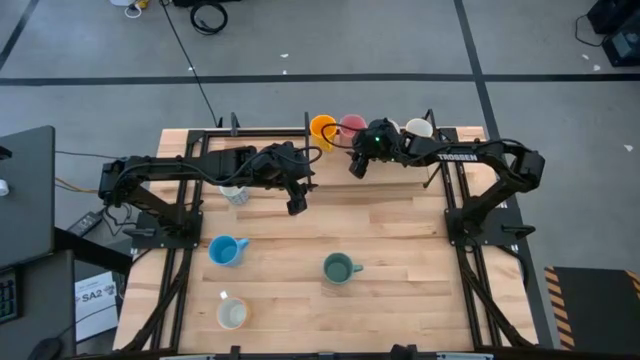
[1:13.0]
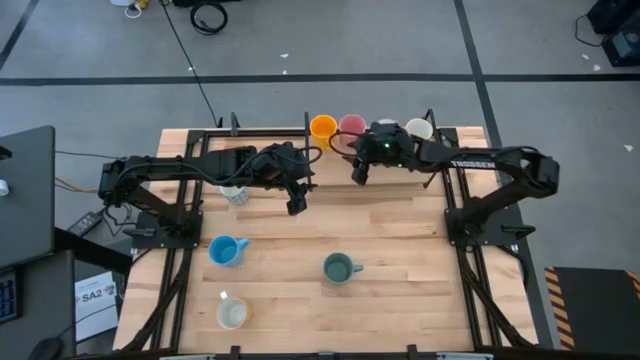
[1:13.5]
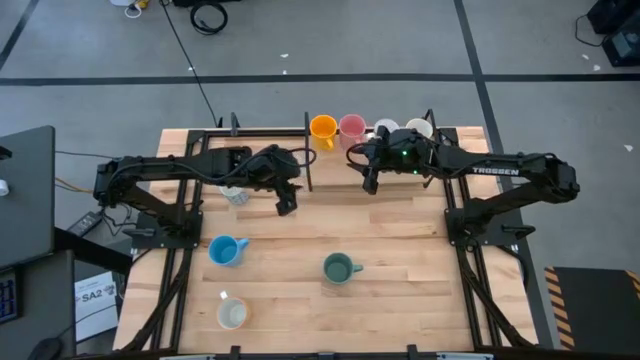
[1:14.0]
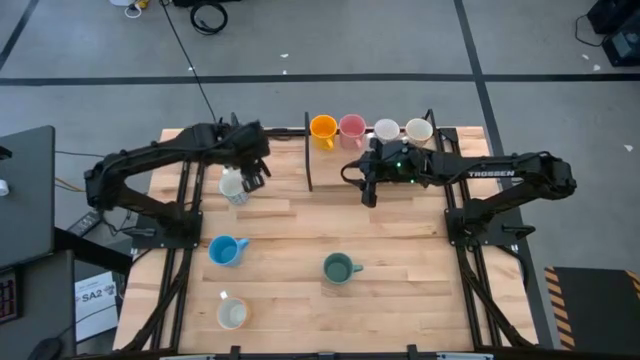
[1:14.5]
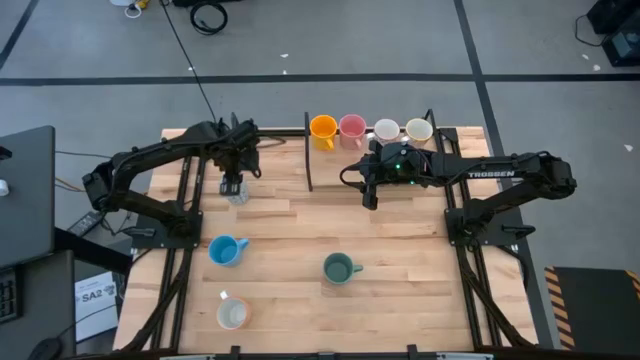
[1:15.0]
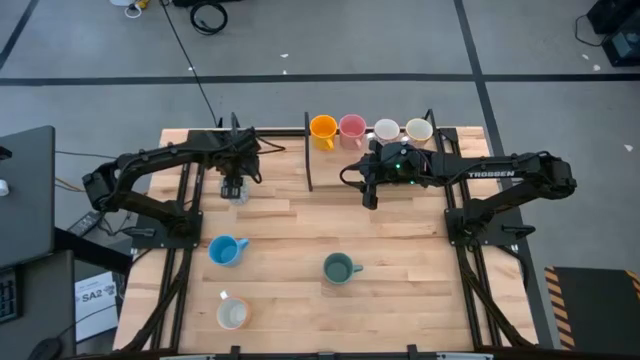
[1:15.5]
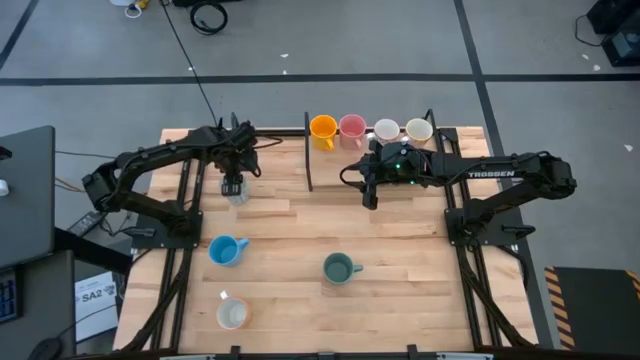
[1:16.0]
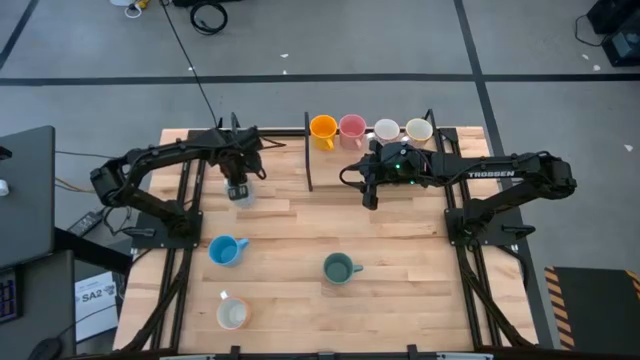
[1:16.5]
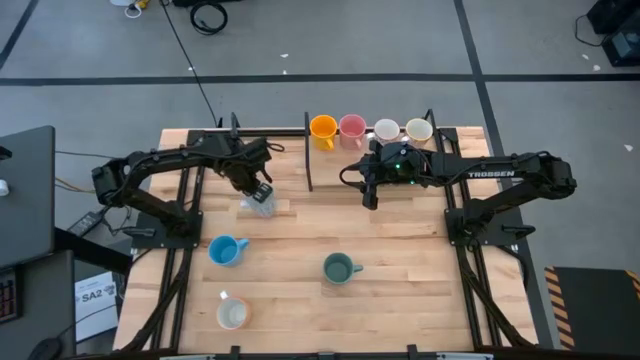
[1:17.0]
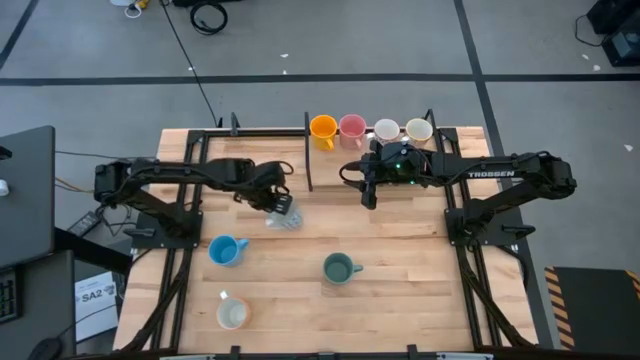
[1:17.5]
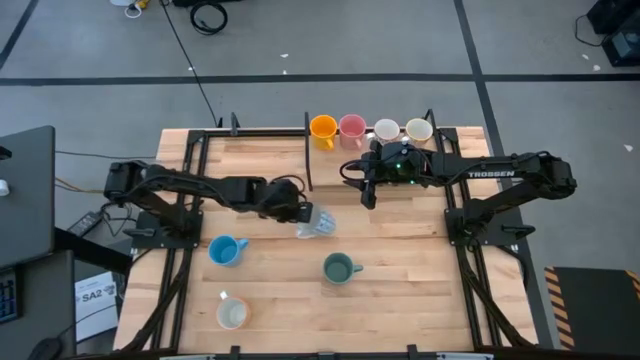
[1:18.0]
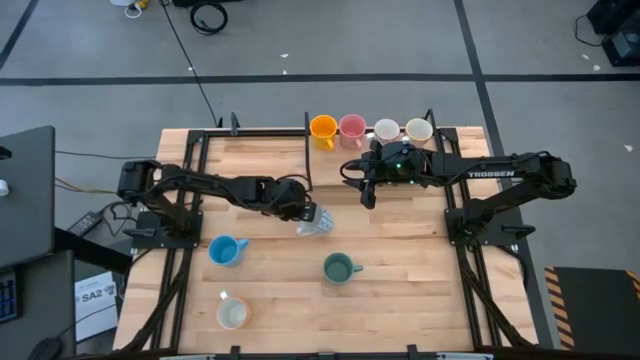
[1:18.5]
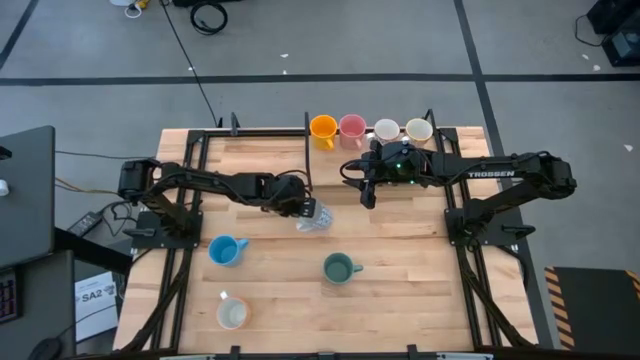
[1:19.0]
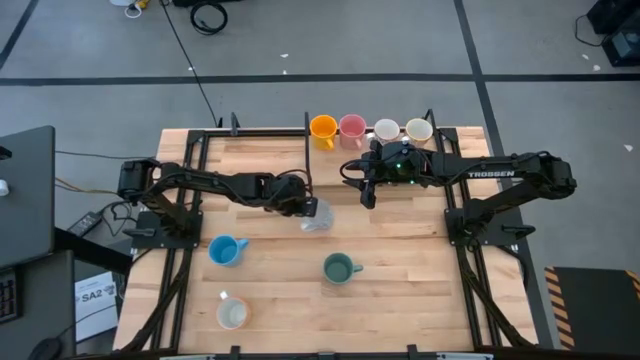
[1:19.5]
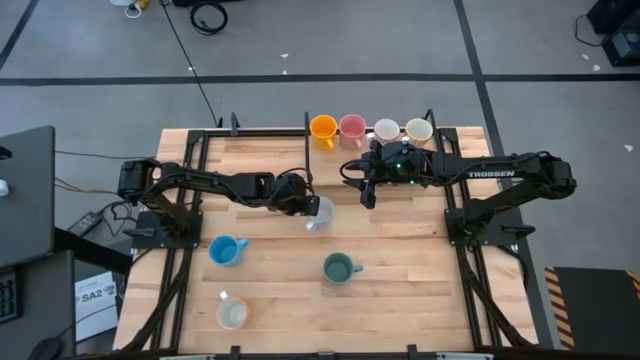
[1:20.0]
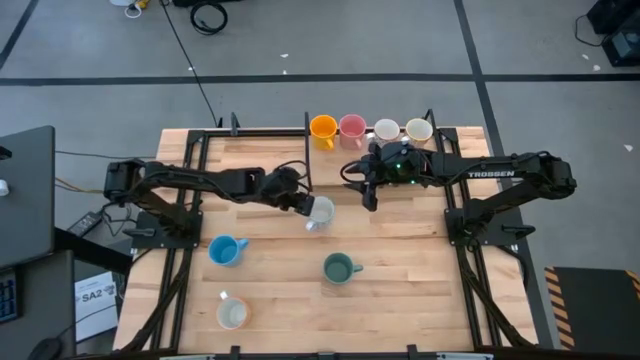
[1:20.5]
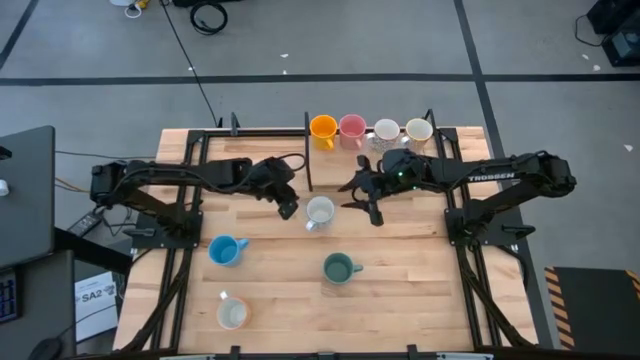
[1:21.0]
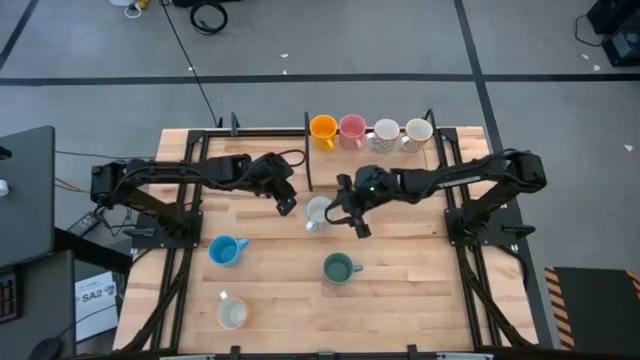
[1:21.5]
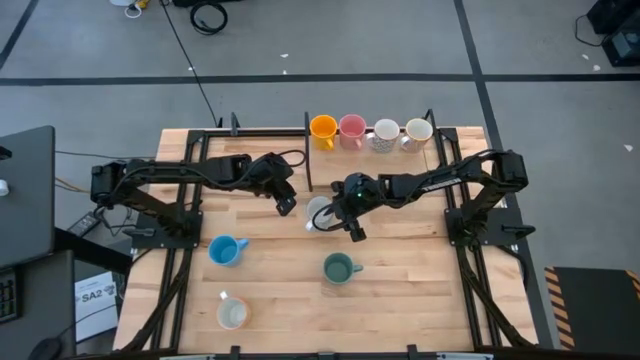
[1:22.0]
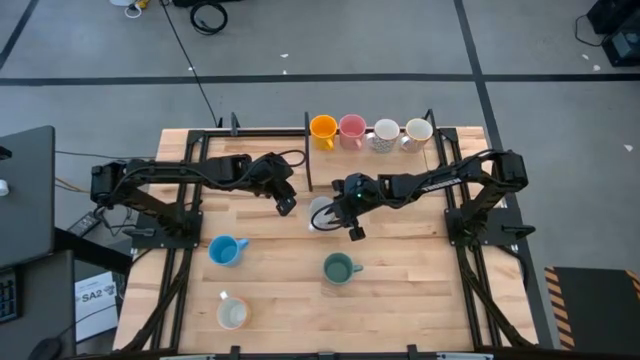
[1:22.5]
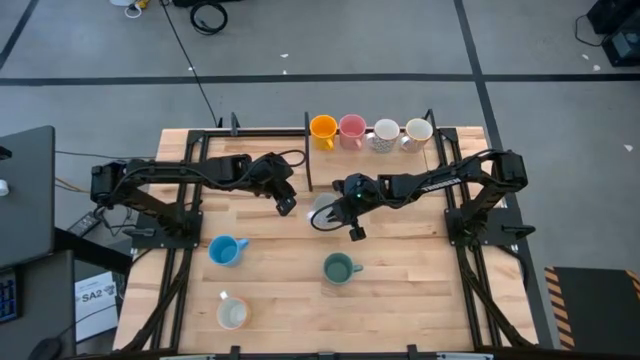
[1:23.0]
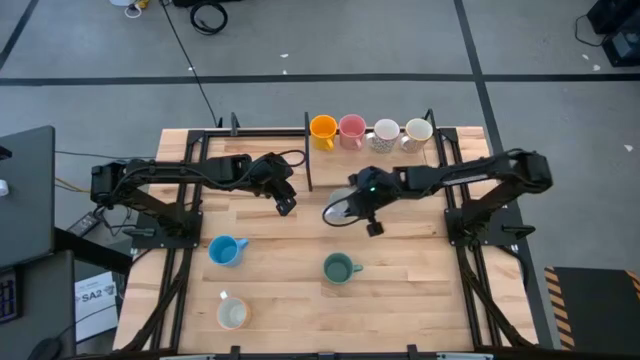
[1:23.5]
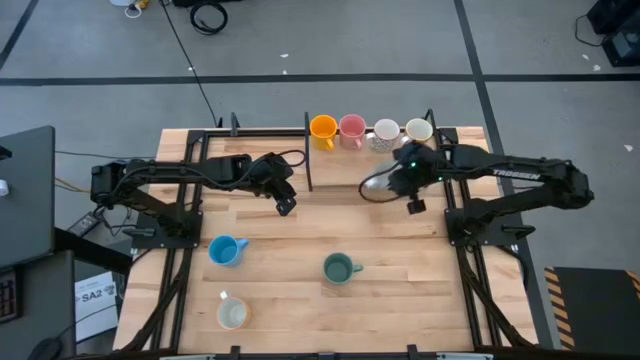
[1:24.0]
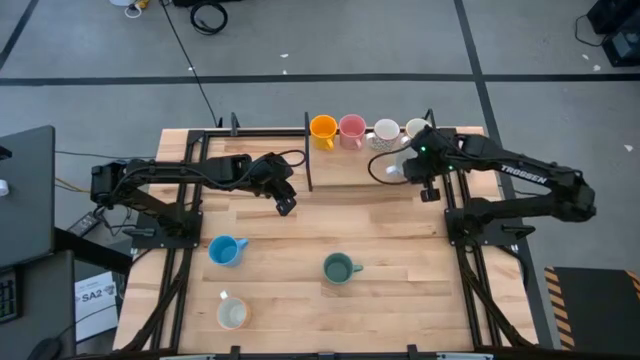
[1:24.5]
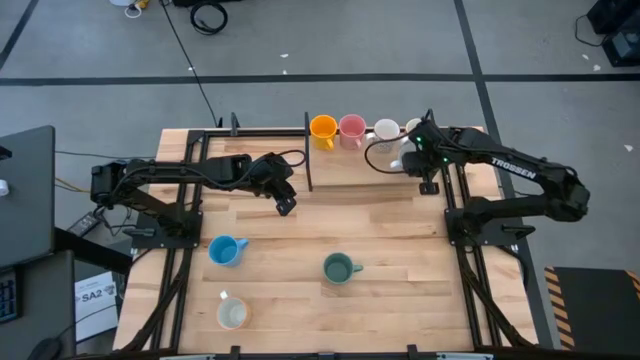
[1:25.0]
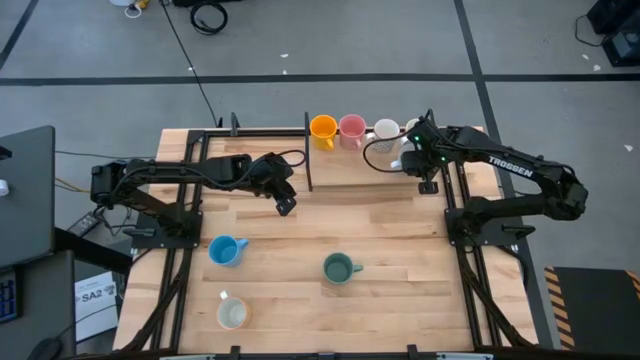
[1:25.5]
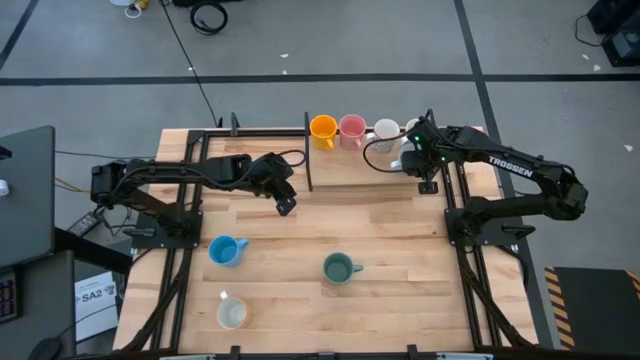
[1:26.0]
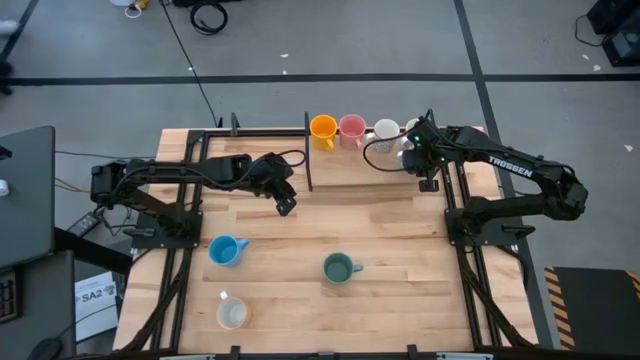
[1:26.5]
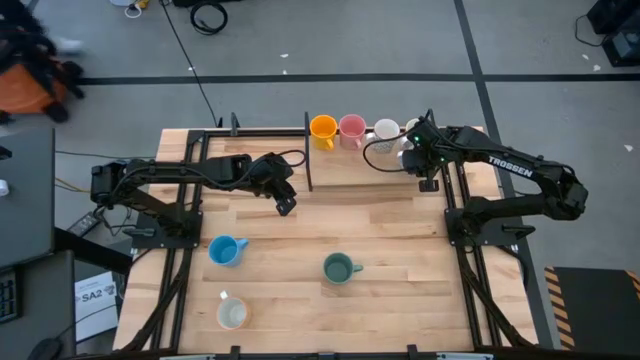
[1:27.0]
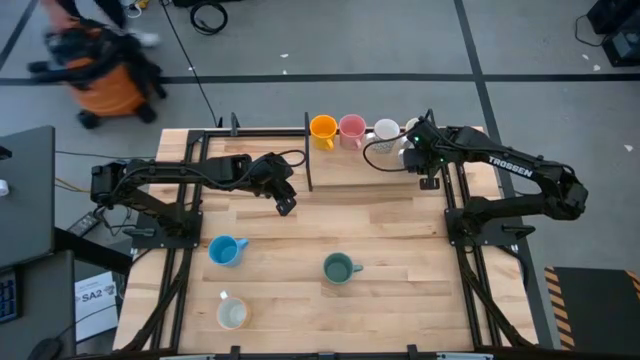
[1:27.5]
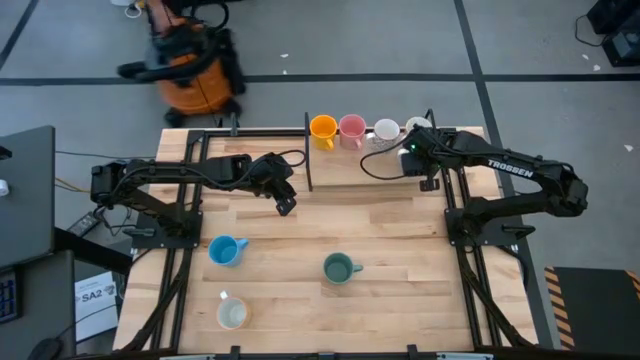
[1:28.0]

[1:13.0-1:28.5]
Task: Place coffee mugs
Put the blue and white patterned mug on the shelf

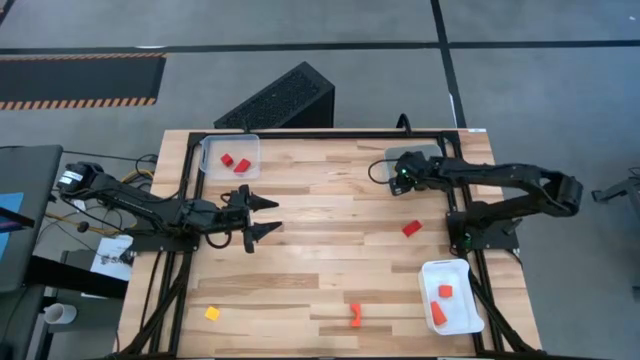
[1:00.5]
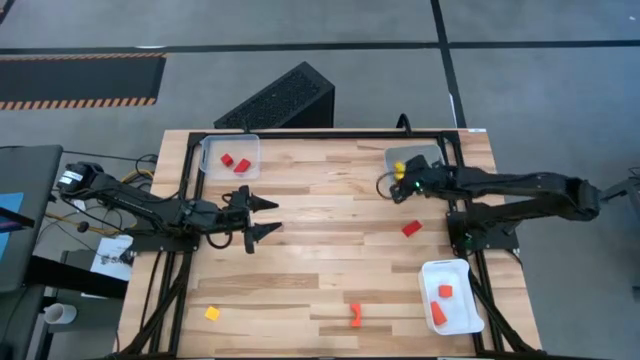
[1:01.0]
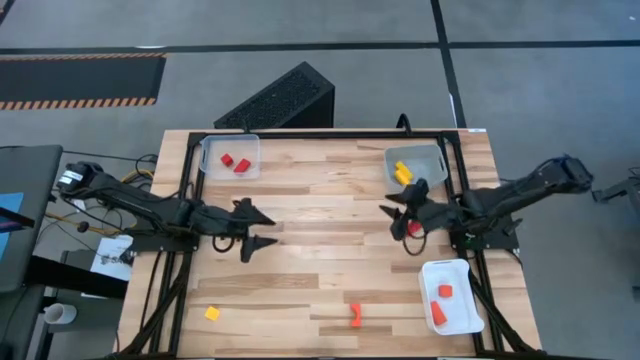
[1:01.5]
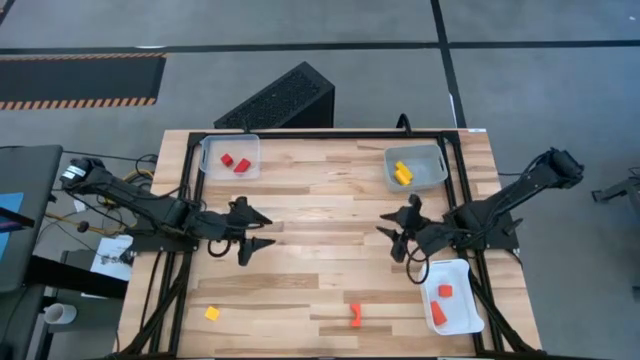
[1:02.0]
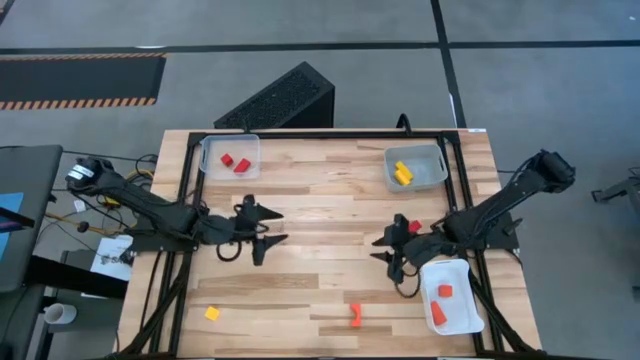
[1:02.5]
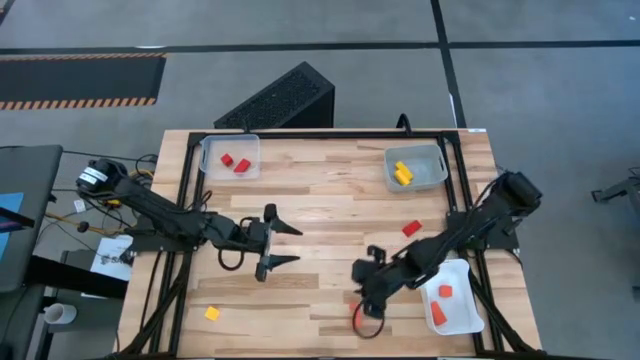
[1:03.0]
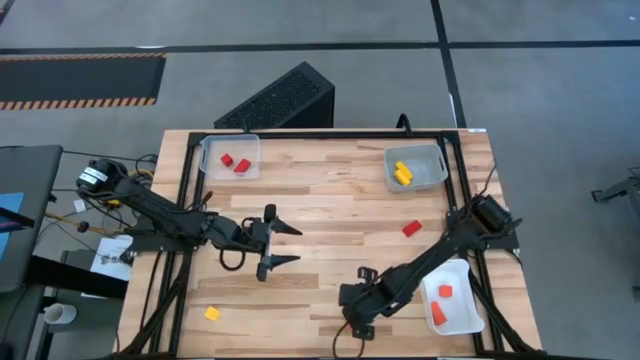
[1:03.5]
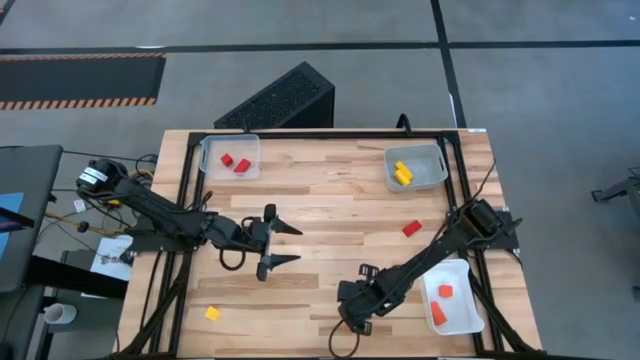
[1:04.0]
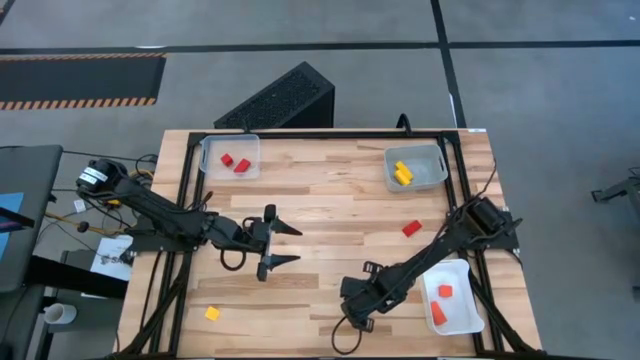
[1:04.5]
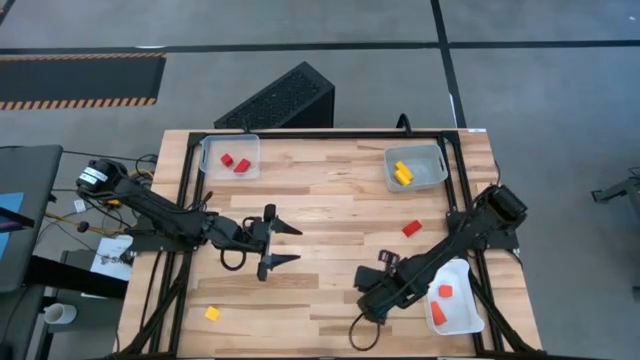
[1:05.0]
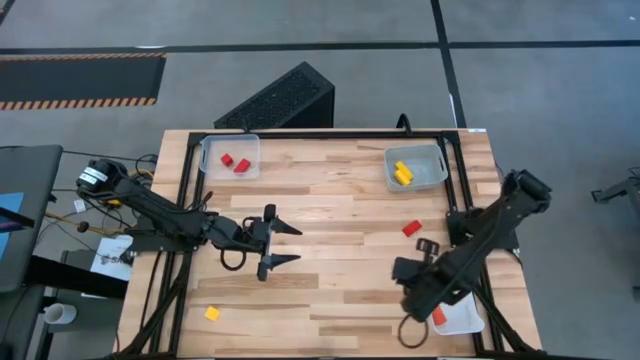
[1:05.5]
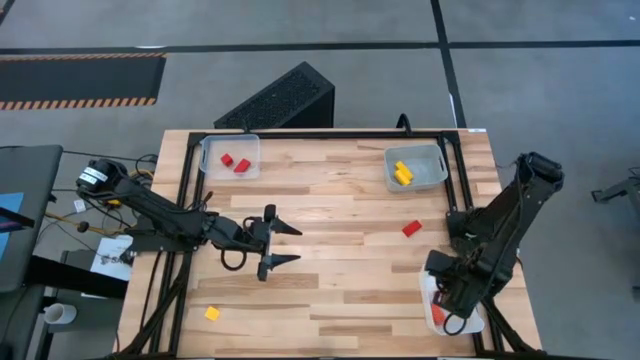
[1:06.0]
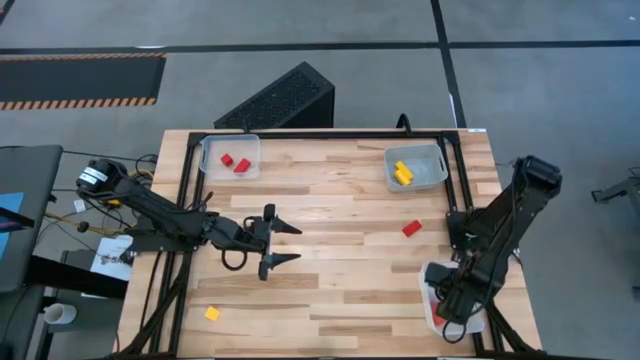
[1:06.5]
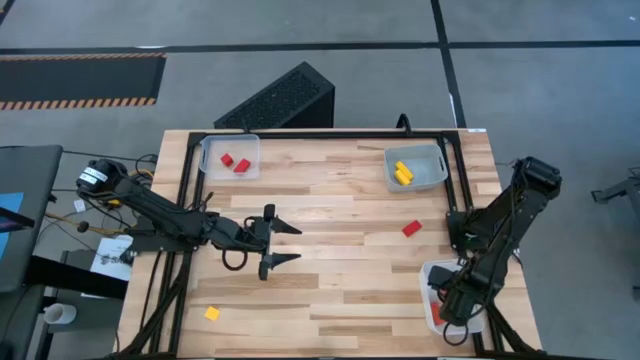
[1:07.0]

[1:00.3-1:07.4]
Task: Sort & place blocks by color
Put the orange block into the white bin
